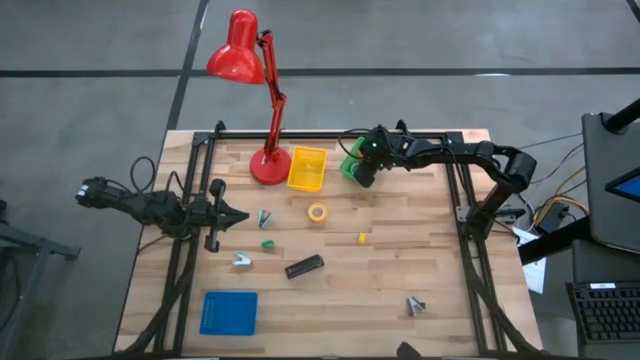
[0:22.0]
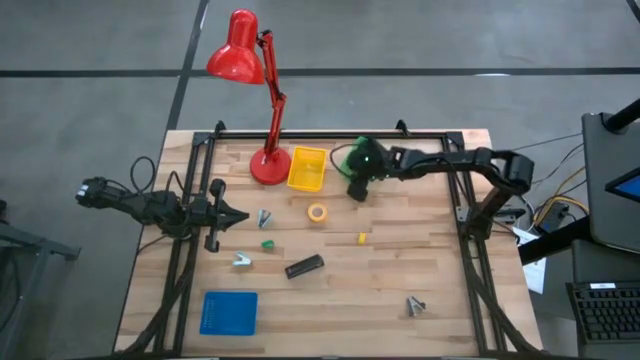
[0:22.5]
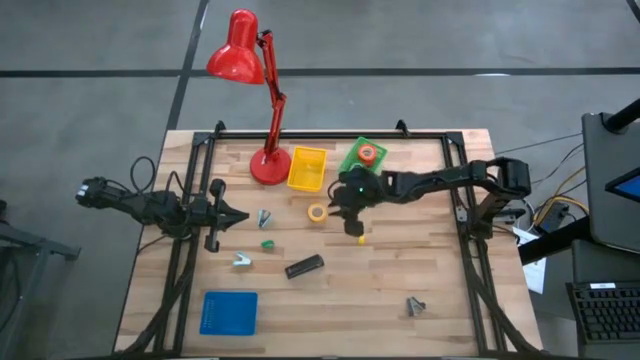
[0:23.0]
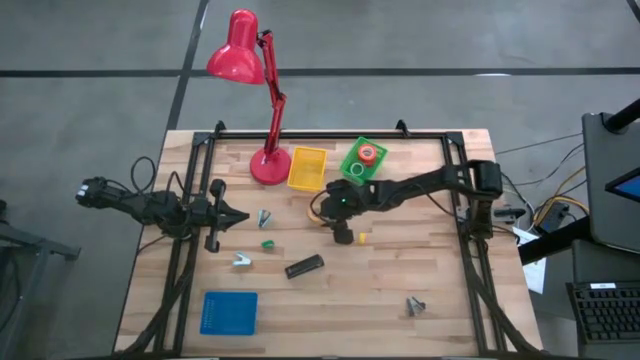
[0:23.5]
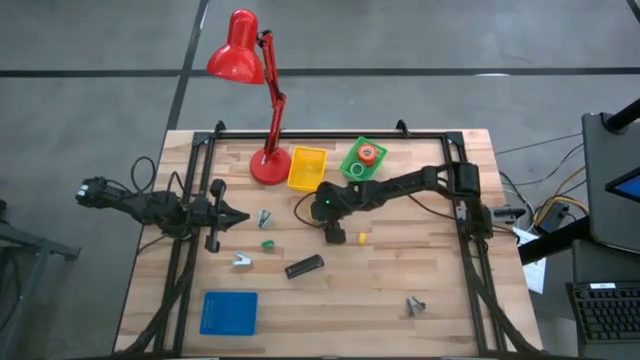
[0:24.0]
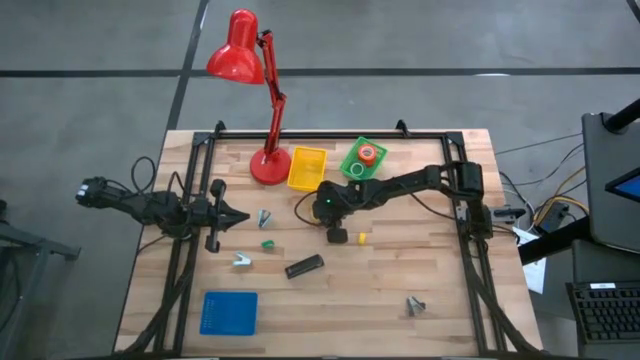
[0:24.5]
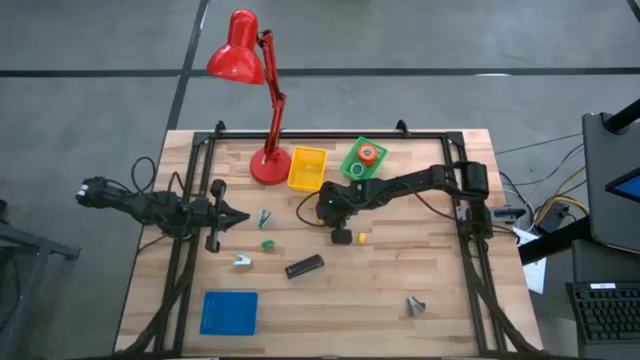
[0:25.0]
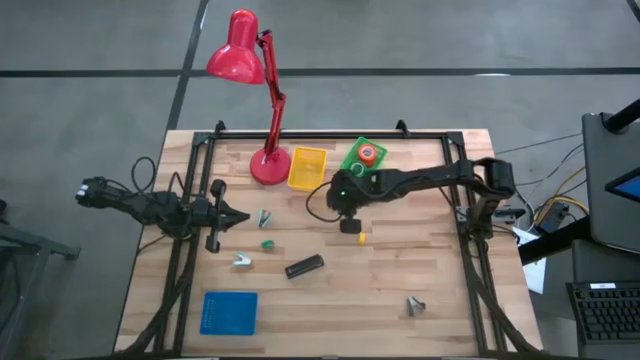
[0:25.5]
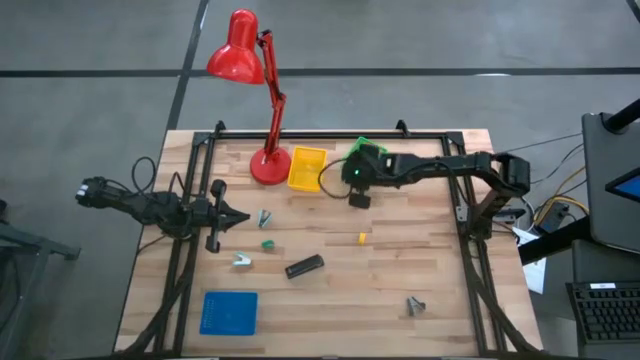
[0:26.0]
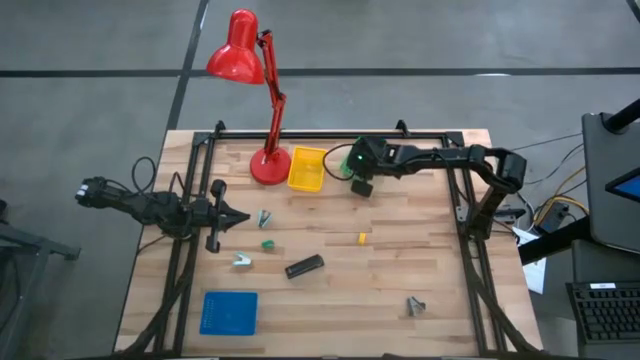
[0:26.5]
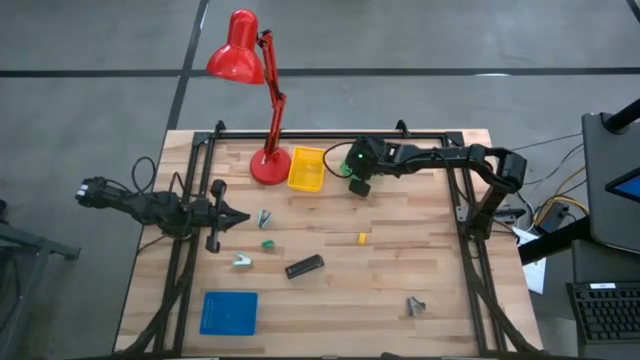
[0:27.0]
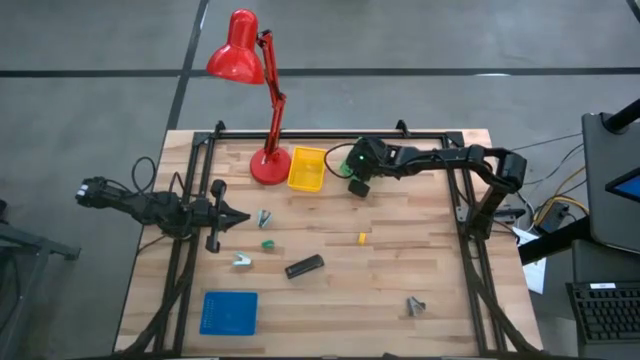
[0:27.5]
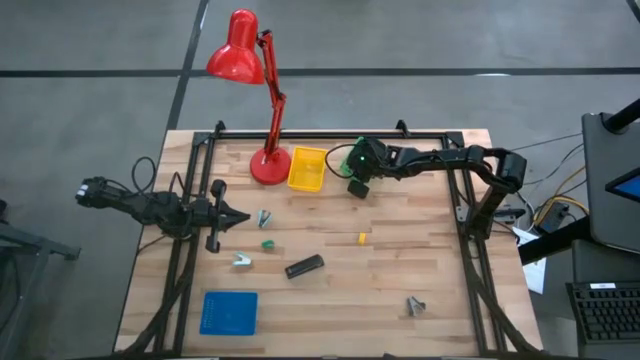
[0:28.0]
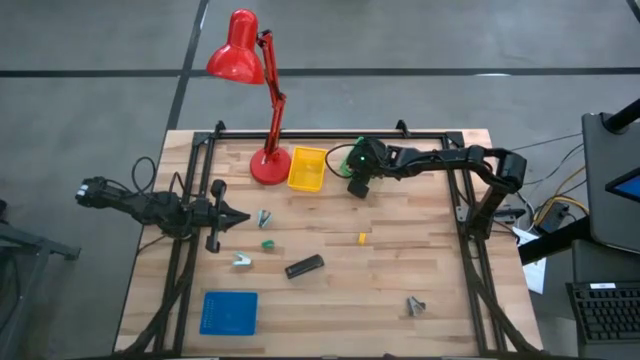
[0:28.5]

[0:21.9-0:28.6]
Task: Pick and place Stapler, Stapler remover, tape
Put the yellow tape into the green bin

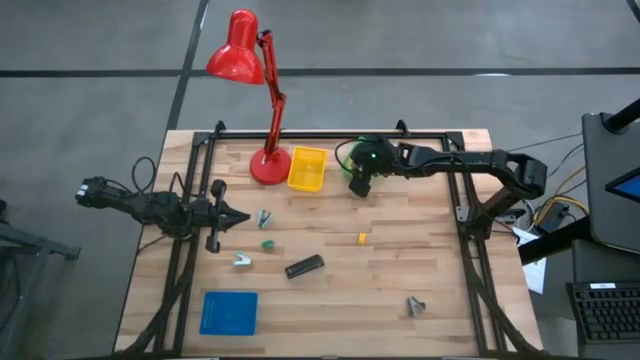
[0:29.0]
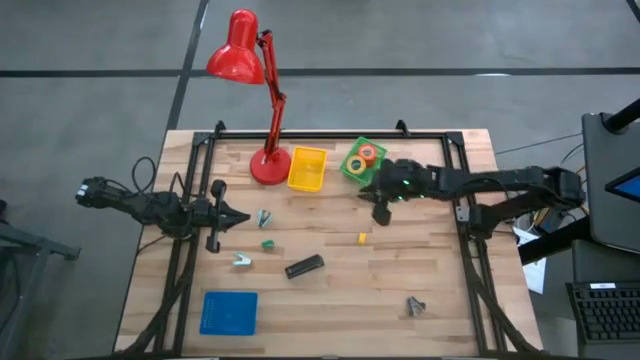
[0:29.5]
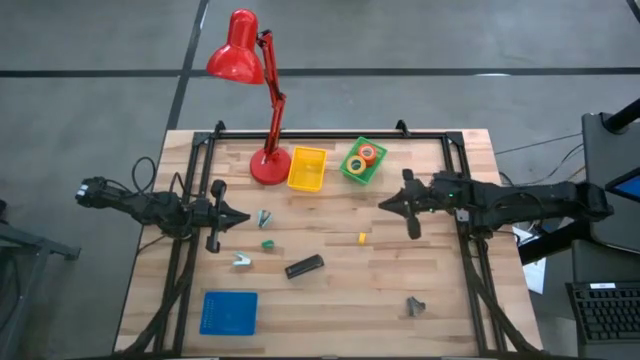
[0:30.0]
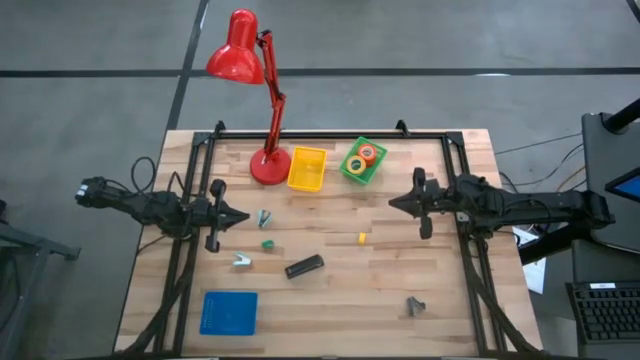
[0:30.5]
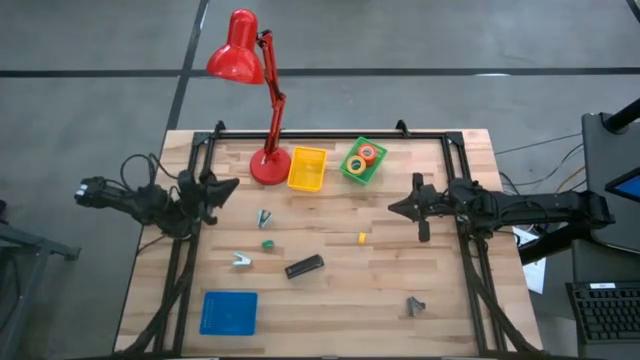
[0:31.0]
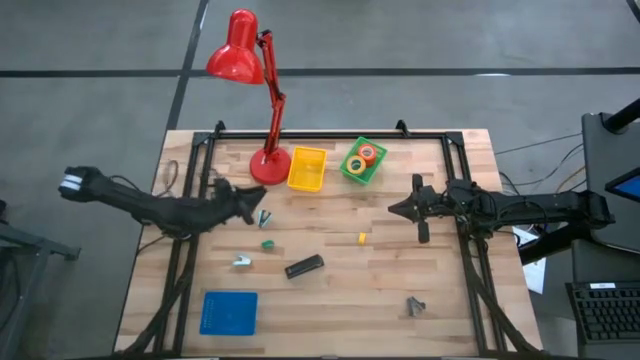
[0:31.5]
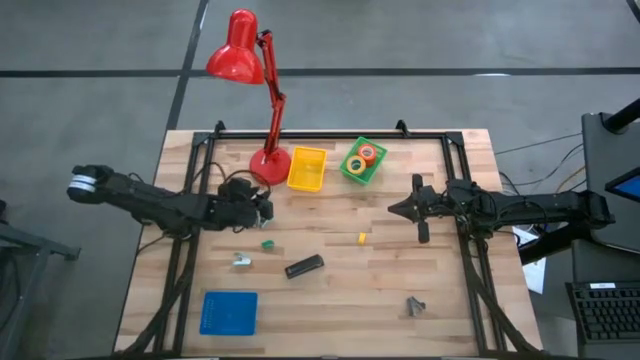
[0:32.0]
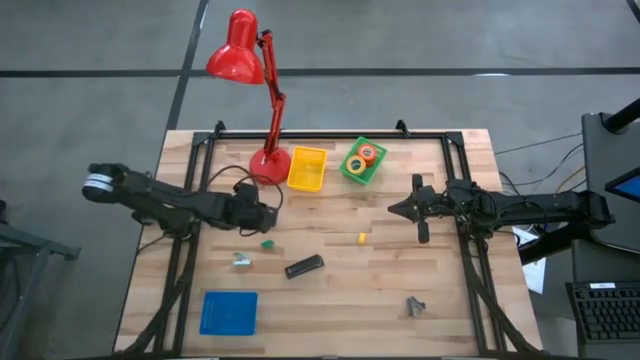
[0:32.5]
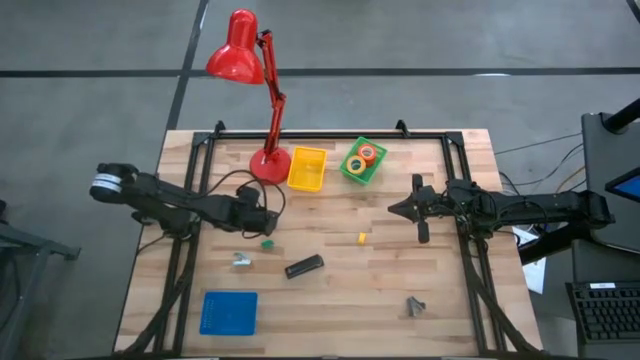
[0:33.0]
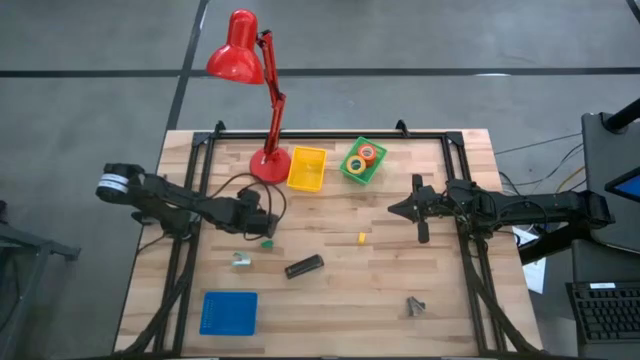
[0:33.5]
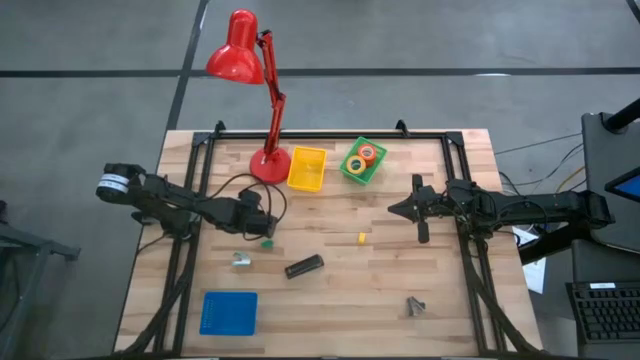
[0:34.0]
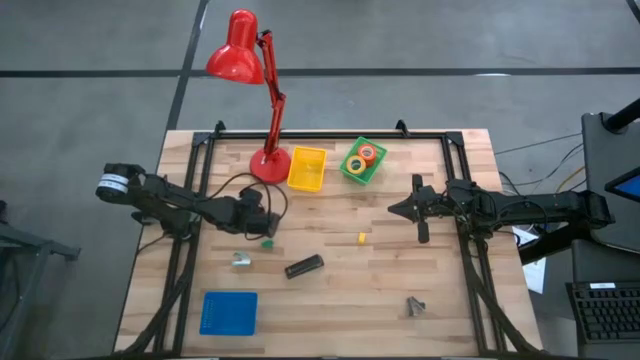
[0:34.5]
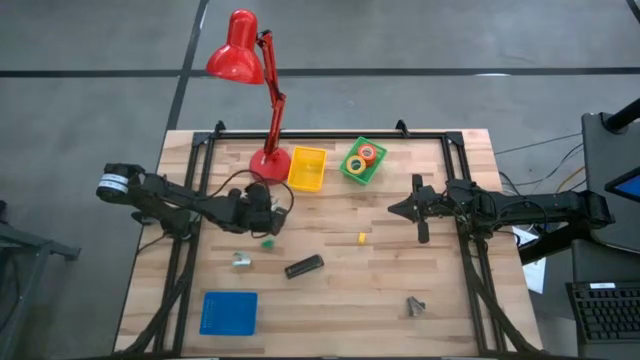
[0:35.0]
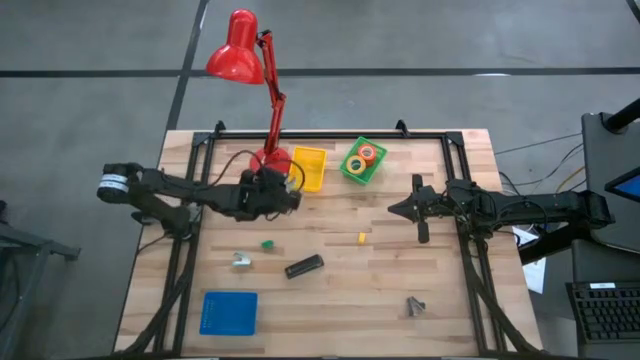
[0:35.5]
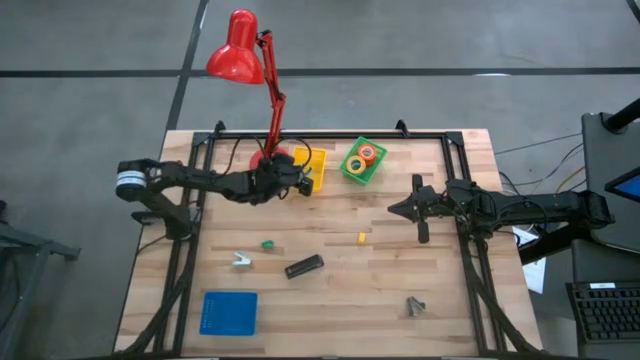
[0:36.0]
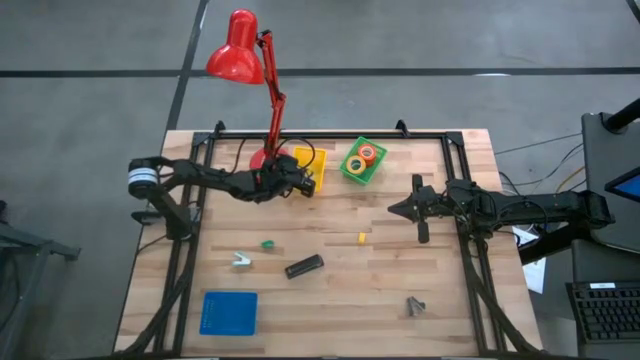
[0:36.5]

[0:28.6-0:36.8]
Put the top blue staple remover into the yellow bin

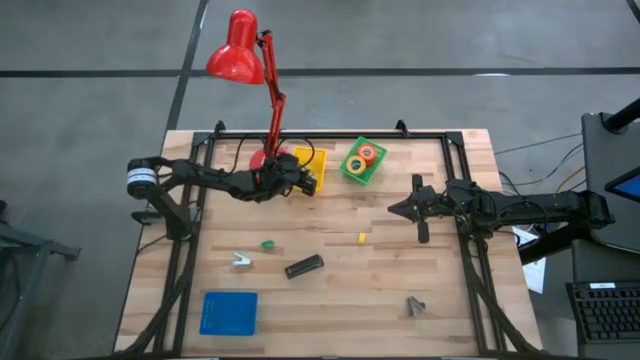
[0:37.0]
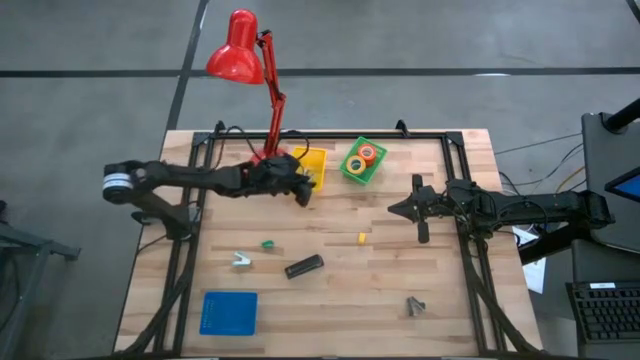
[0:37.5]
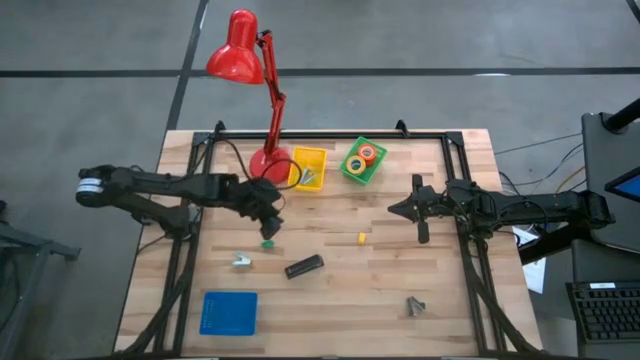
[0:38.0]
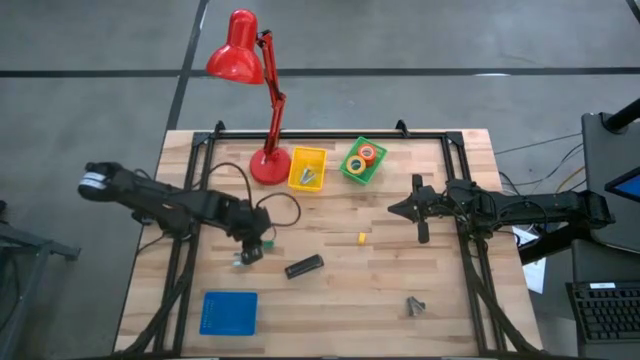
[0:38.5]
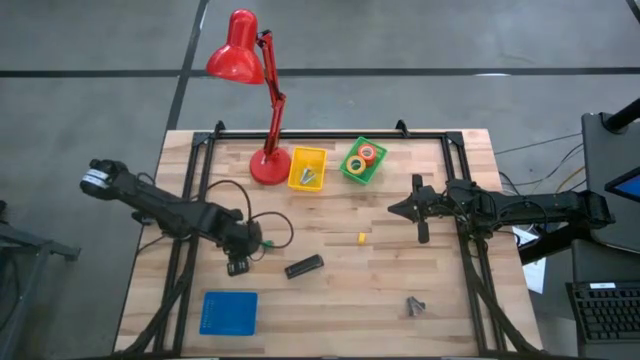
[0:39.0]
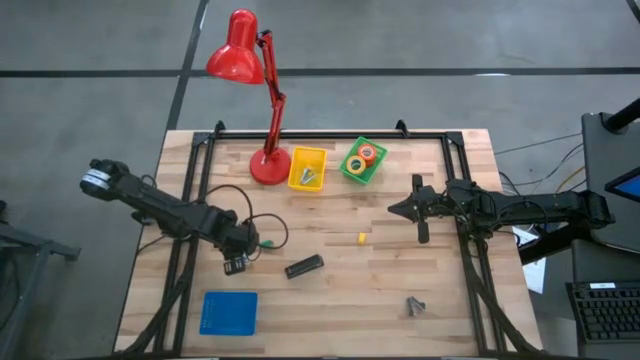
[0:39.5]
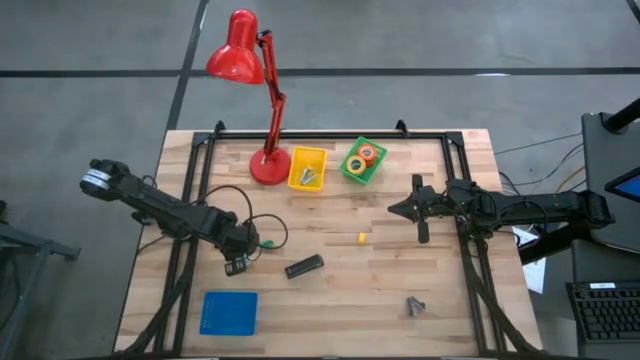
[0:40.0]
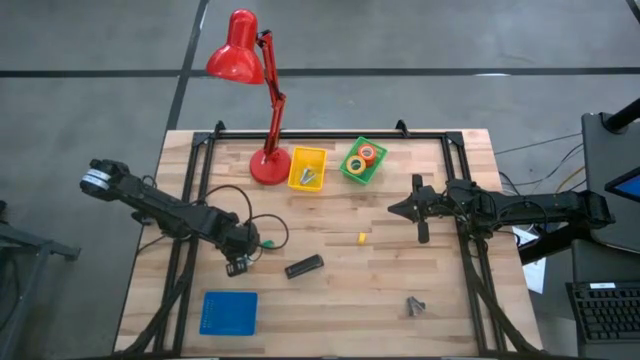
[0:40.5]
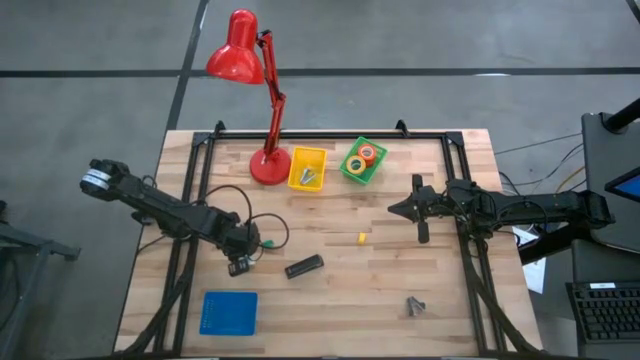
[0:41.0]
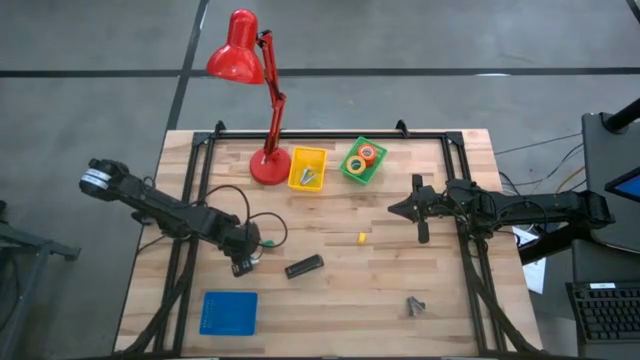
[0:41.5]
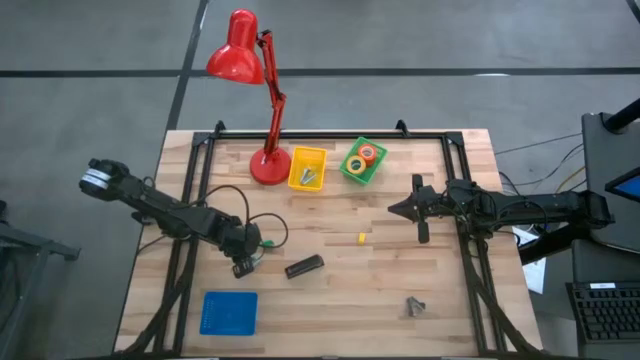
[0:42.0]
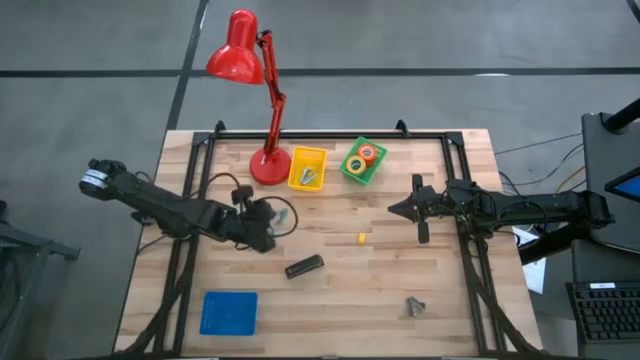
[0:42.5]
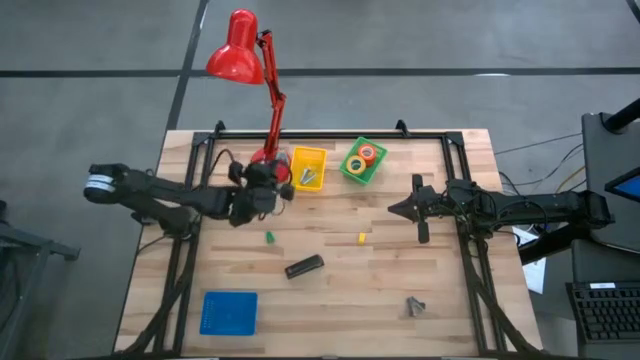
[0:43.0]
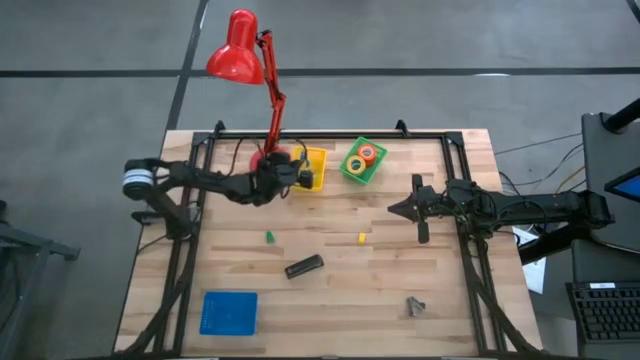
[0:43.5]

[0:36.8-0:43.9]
Put the blue staple remover into the yellow bin
